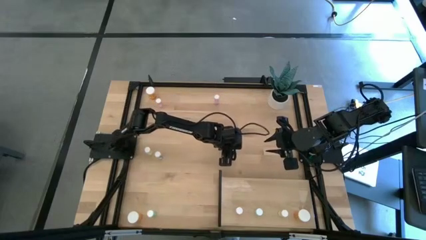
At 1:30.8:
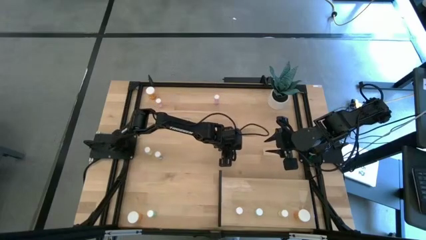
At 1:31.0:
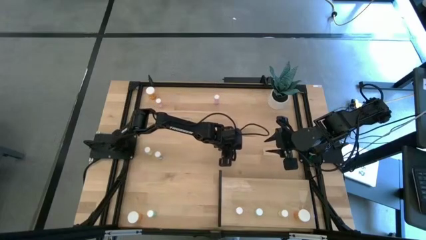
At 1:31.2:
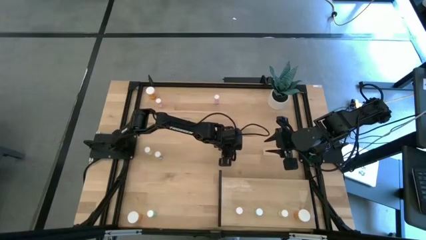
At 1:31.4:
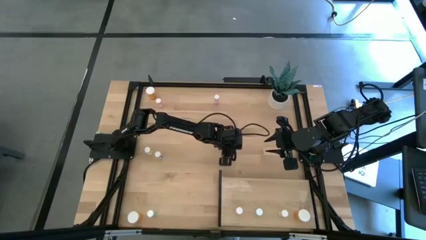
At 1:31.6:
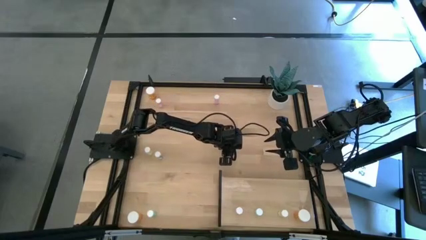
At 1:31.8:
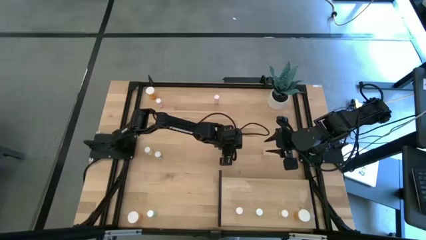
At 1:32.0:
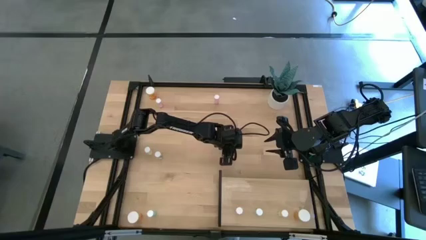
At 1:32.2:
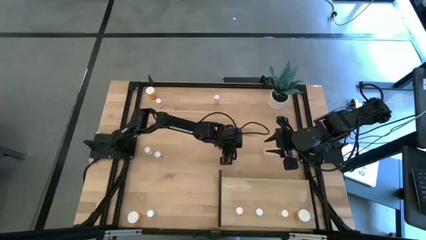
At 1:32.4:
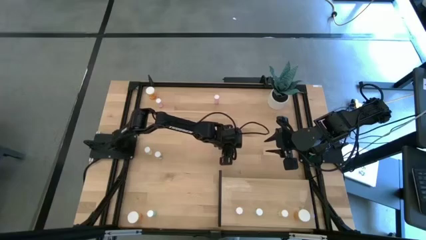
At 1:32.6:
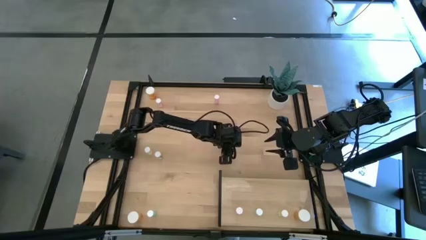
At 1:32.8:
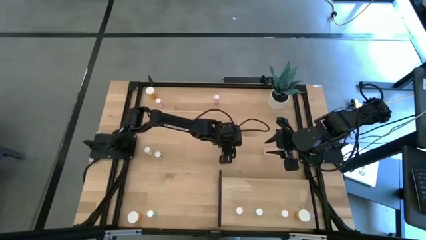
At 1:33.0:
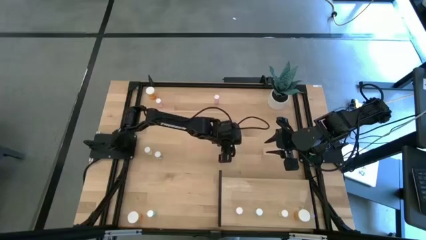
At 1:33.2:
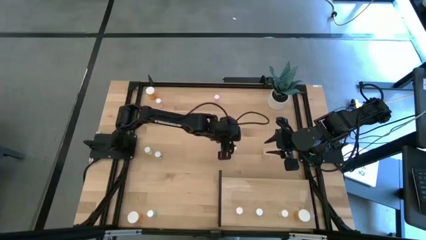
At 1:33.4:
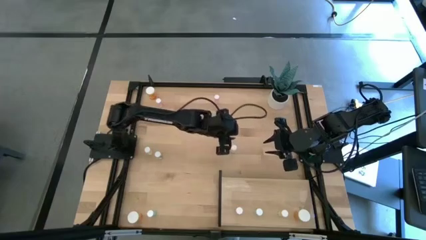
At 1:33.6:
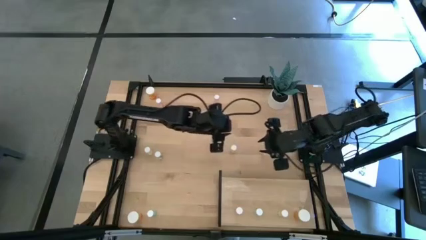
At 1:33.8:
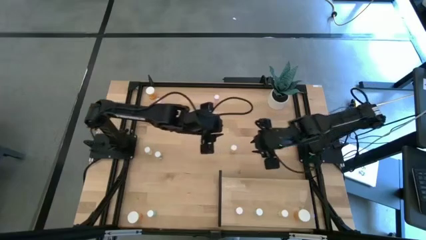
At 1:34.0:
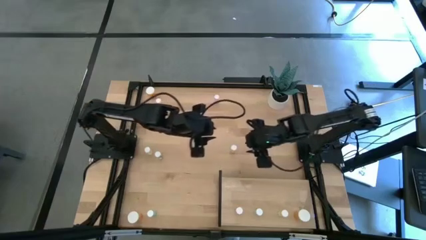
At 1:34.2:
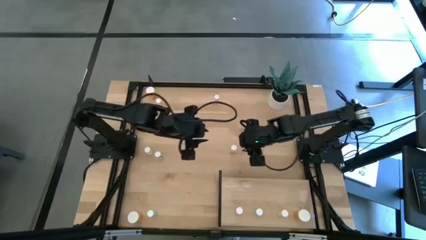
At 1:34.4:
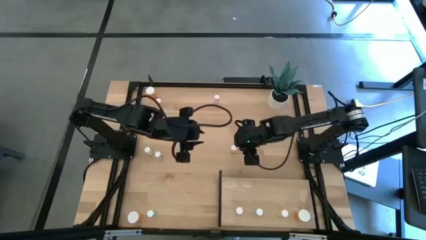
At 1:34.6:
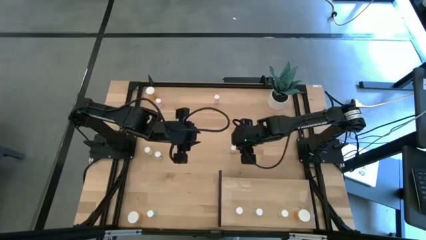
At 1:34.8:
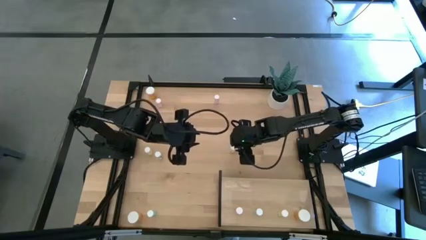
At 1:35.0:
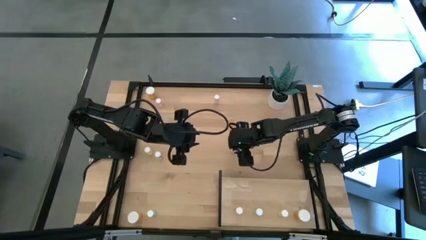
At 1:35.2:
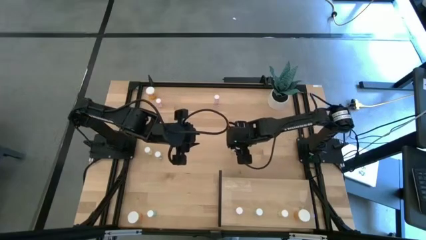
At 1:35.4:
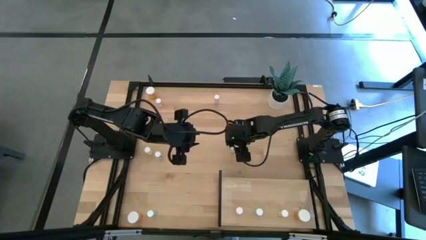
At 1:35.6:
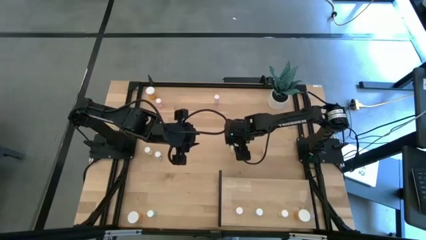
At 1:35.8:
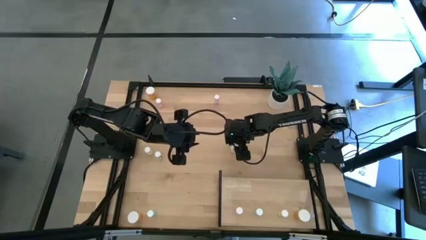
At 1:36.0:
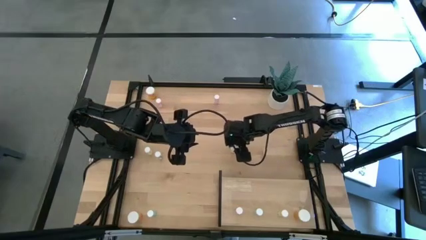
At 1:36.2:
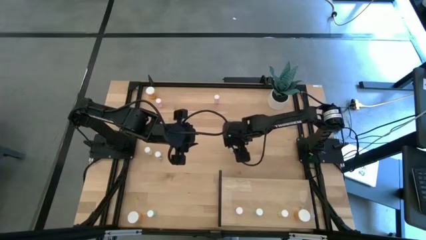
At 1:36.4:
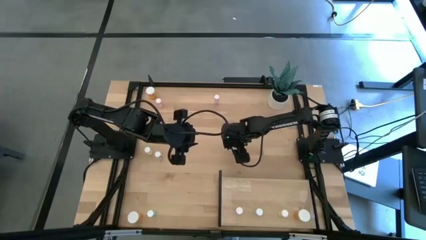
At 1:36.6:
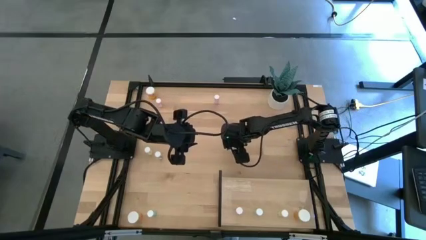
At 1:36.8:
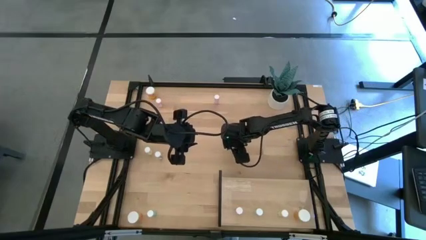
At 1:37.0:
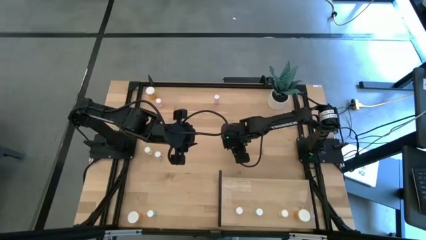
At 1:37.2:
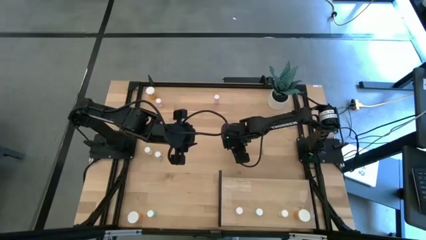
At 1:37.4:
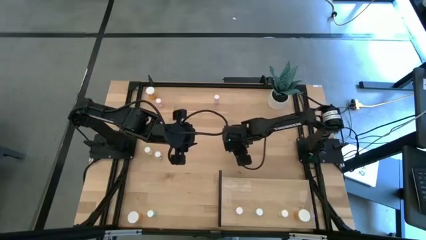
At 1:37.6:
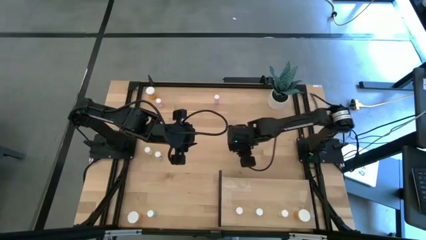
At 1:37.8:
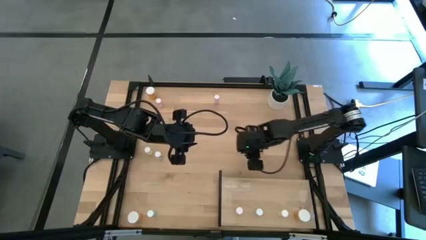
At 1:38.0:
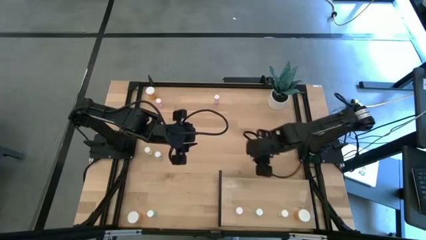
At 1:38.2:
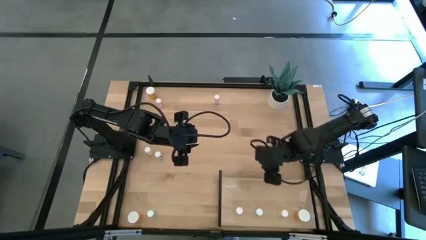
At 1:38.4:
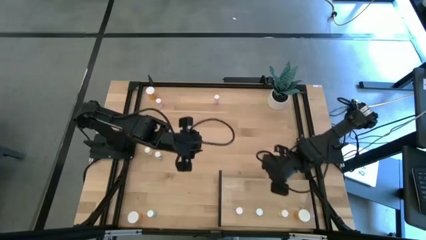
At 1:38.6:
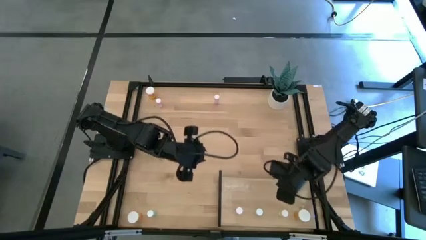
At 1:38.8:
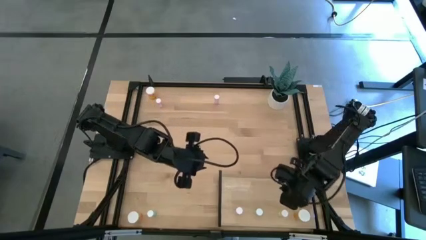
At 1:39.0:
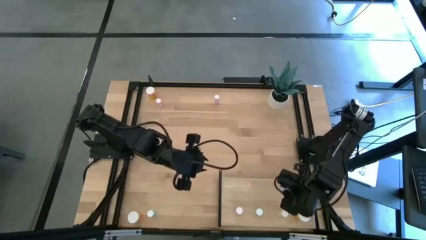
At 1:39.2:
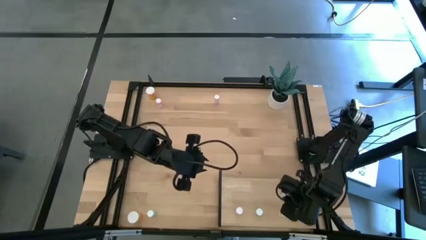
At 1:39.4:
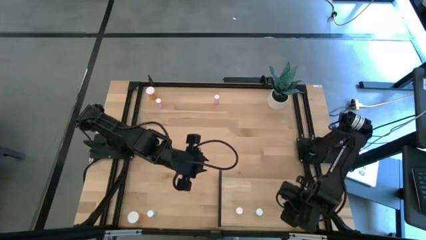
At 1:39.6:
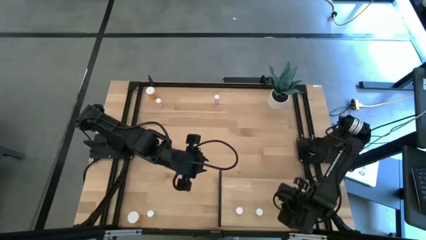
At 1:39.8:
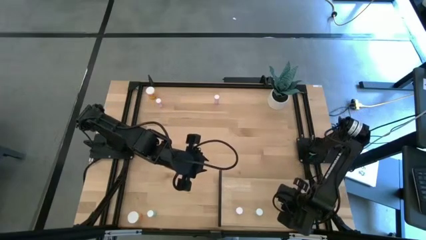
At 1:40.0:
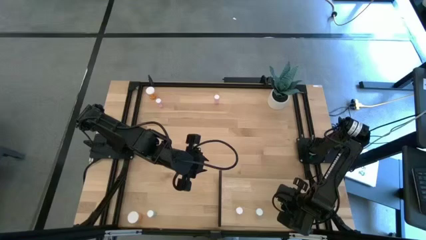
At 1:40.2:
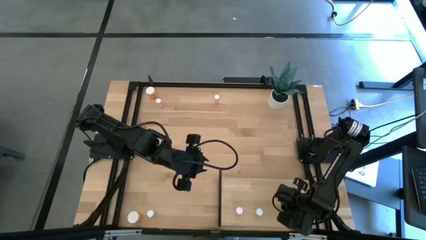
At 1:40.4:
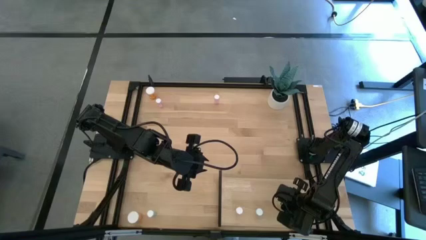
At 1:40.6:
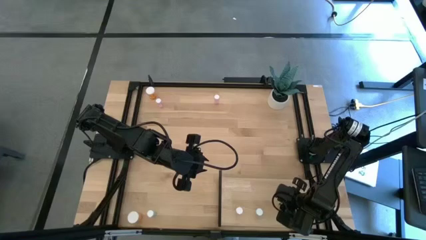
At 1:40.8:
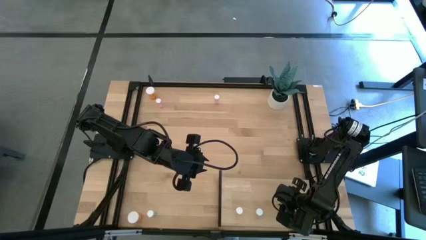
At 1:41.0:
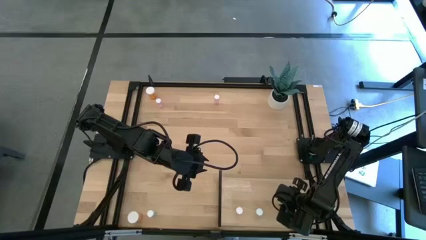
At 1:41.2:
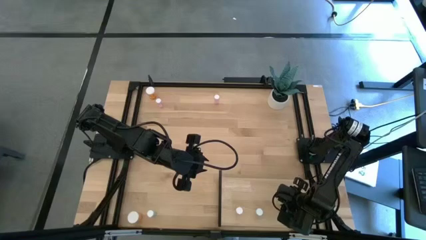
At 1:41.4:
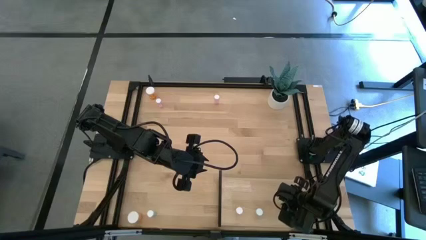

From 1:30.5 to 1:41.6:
Task: Pick and place medicine bottles onto shelf by color
Put the bottom yellow pill bottle on the shelf aligned with the other yellow pill bottle

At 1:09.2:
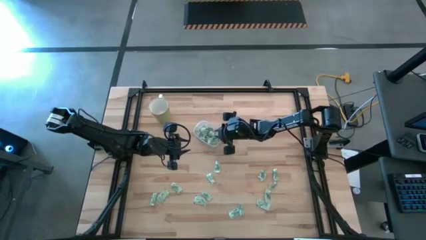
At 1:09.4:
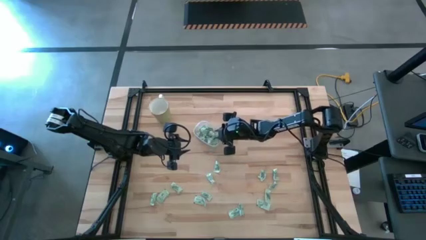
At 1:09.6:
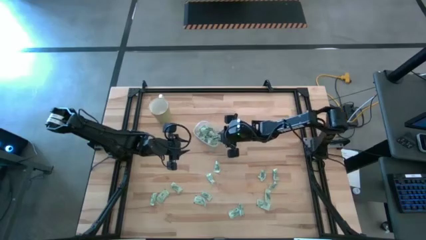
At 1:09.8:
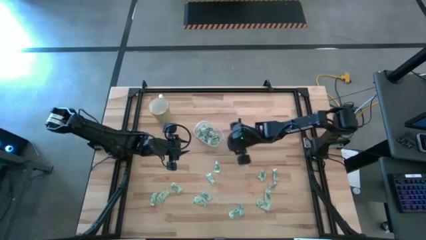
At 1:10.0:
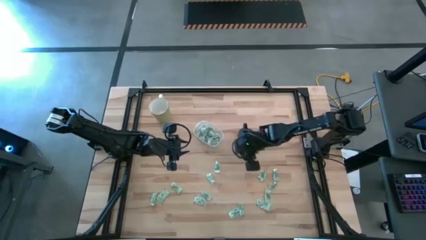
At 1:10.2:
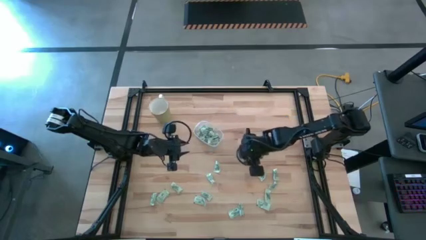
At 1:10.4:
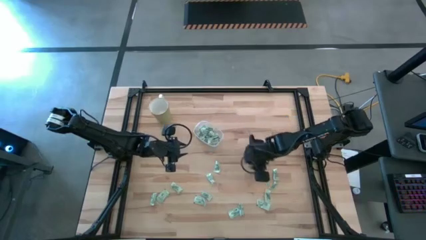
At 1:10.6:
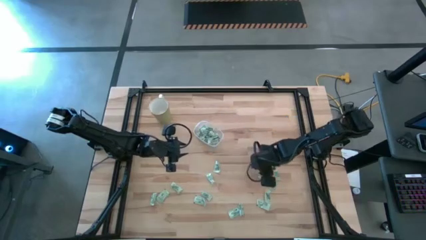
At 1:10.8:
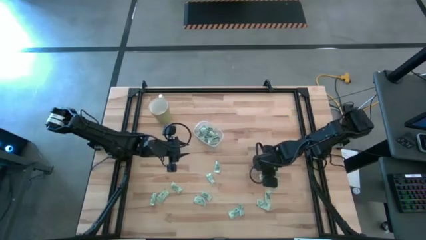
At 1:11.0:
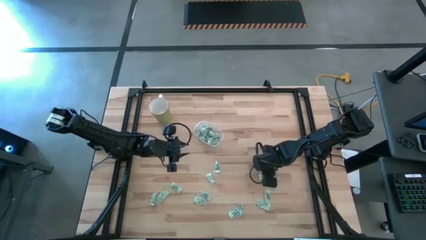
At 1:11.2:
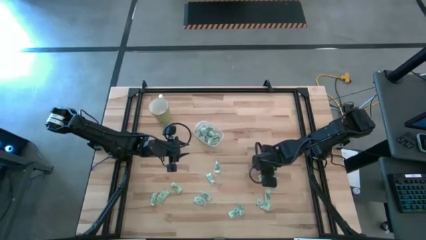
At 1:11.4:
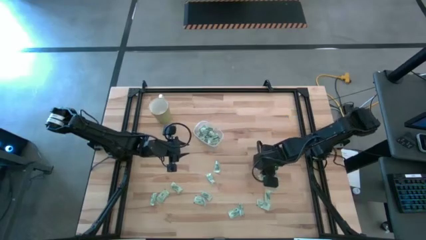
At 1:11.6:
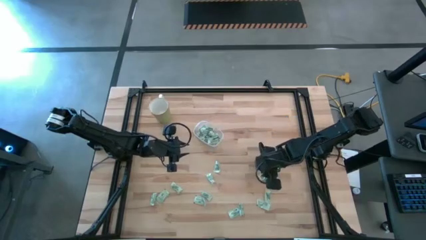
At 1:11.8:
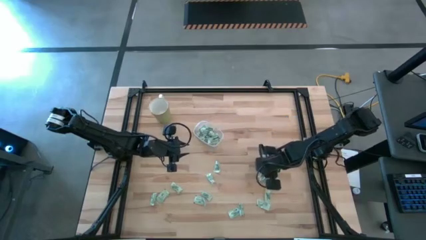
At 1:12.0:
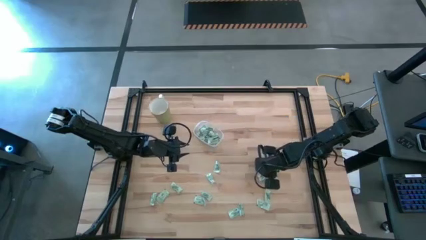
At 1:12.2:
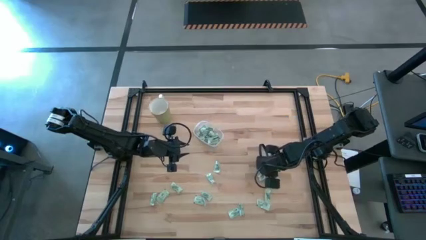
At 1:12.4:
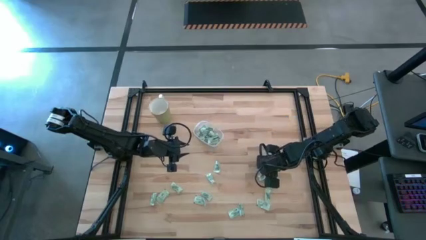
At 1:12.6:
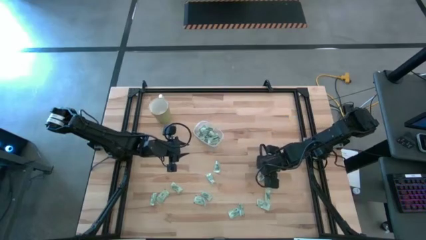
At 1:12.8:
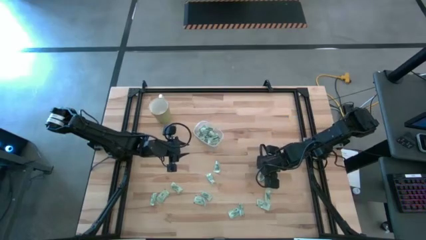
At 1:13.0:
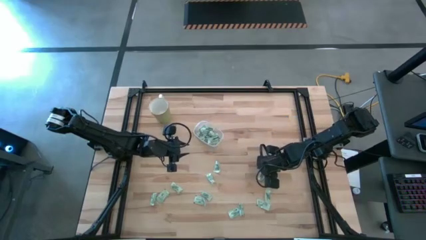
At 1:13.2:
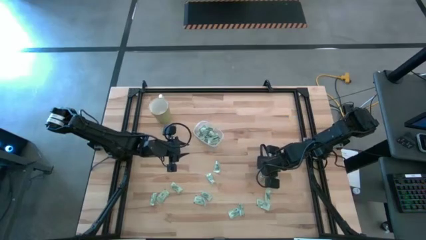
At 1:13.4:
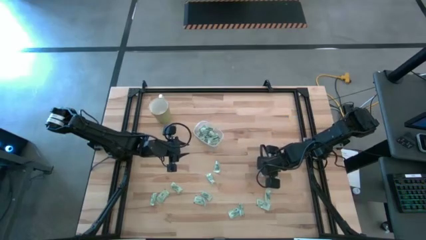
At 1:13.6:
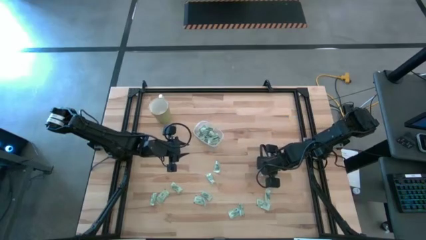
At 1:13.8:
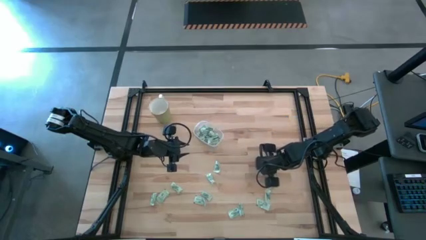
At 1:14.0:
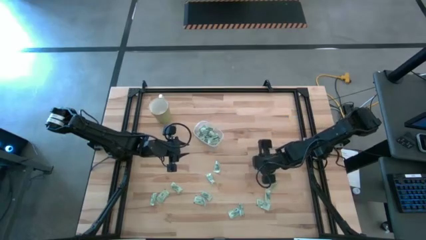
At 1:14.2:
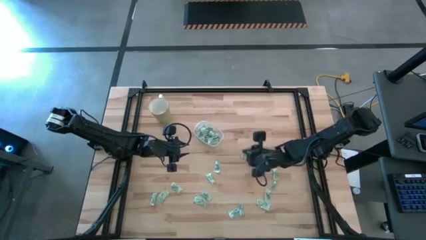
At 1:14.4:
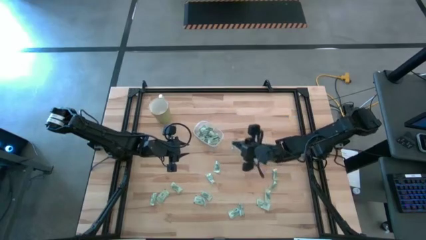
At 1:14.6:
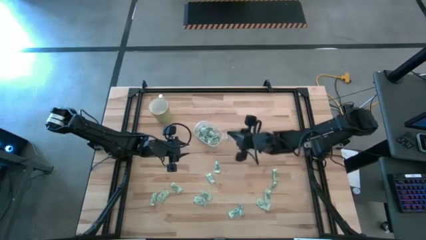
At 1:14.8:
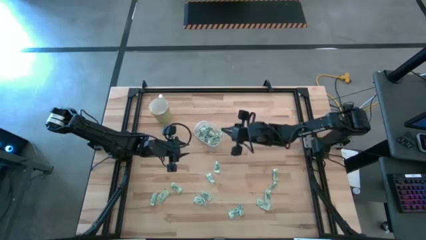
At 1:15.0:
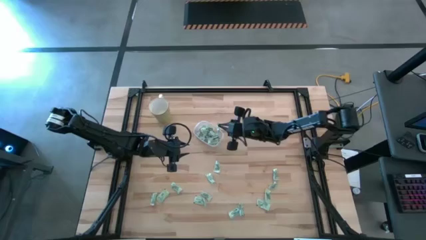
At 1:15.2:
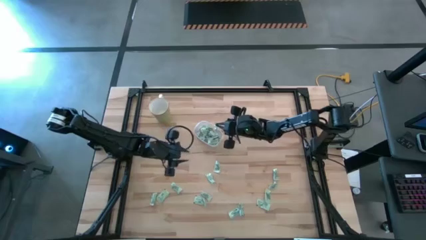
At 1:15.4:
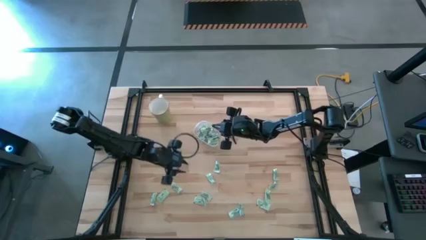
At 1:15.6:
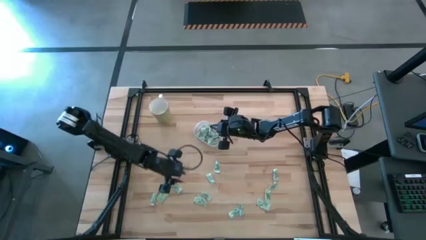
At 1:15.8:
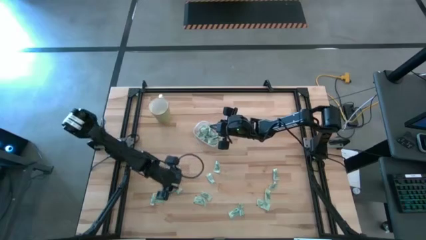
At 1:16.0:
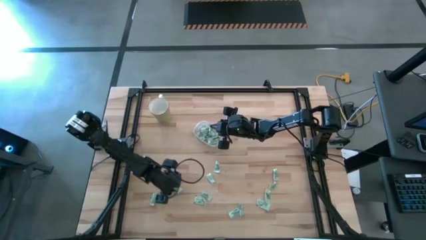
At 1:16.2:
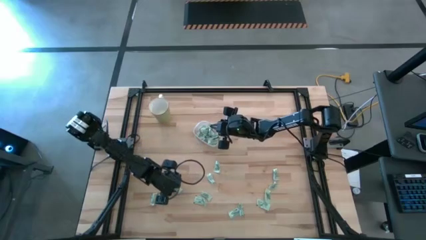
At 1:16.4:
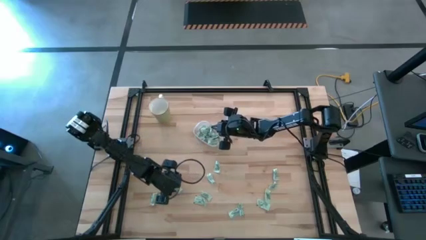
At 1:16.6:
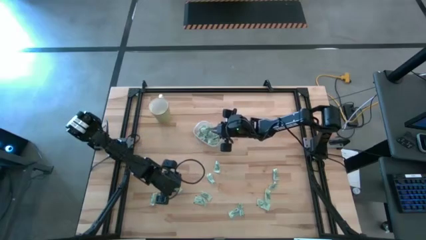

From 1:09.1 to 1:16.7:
Task: Pick and place Stevia / Truvia into bins
Put the stevia packet into the transparent container
